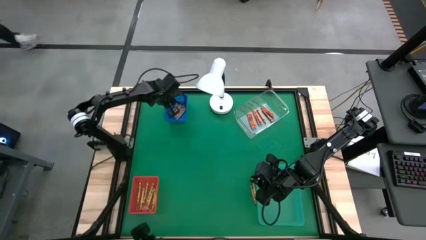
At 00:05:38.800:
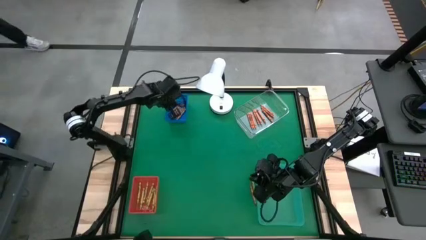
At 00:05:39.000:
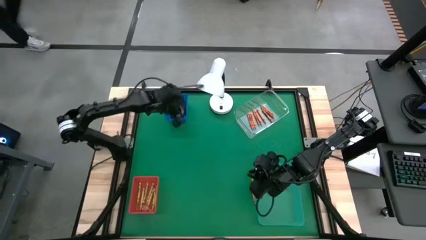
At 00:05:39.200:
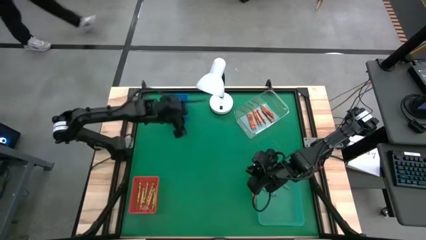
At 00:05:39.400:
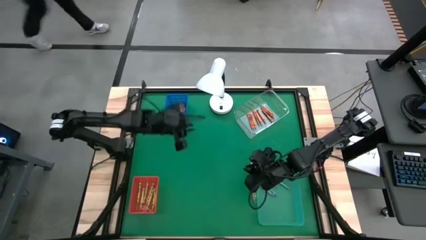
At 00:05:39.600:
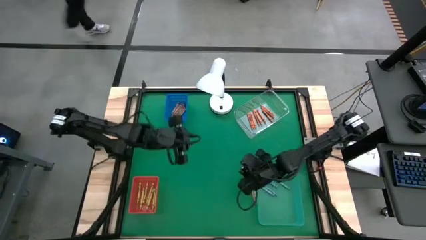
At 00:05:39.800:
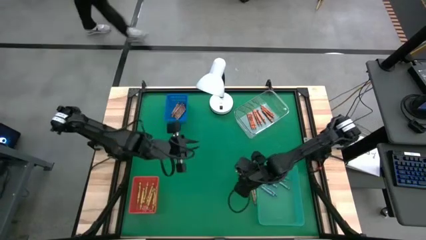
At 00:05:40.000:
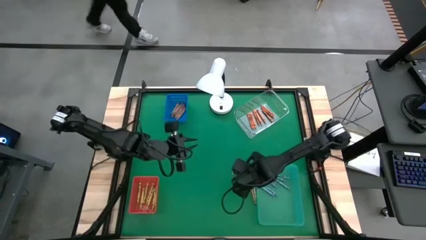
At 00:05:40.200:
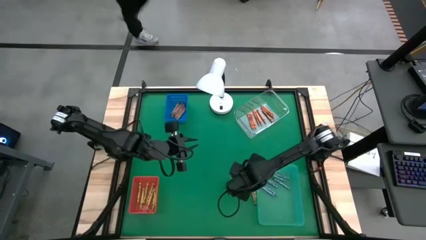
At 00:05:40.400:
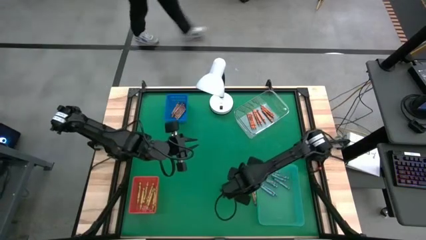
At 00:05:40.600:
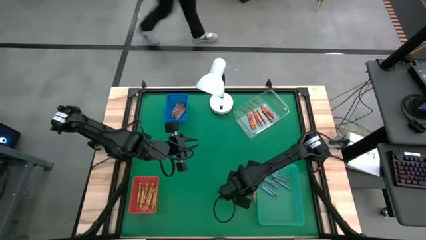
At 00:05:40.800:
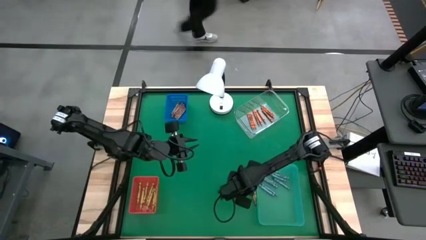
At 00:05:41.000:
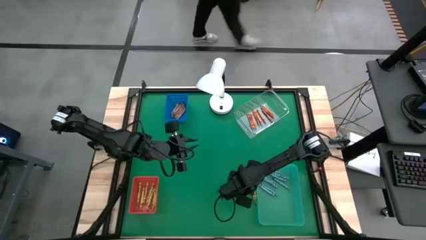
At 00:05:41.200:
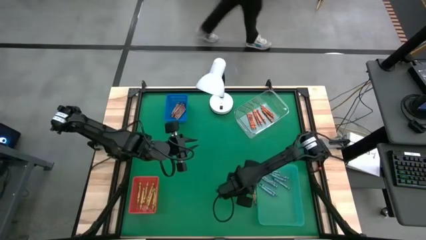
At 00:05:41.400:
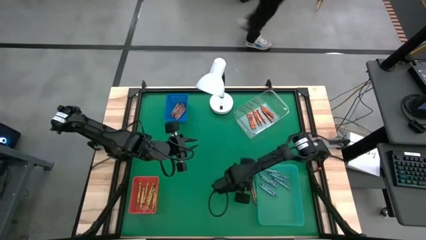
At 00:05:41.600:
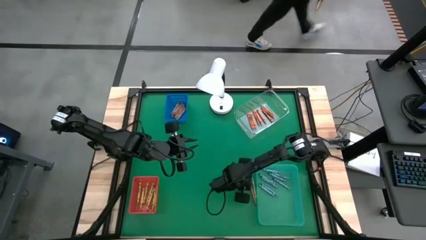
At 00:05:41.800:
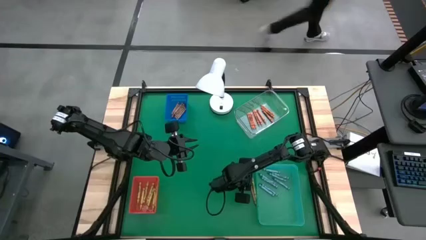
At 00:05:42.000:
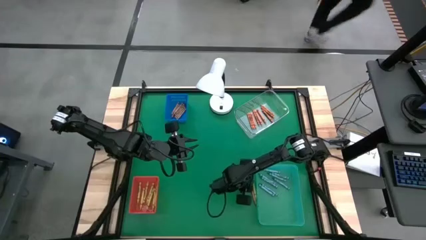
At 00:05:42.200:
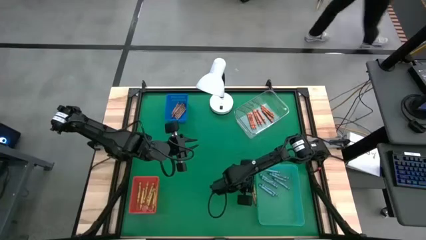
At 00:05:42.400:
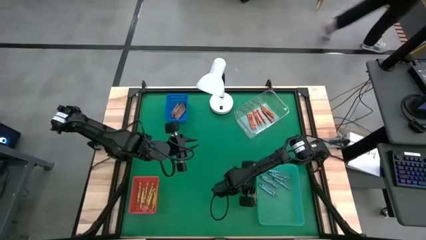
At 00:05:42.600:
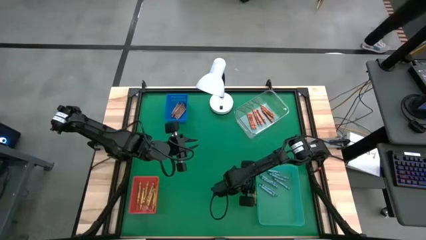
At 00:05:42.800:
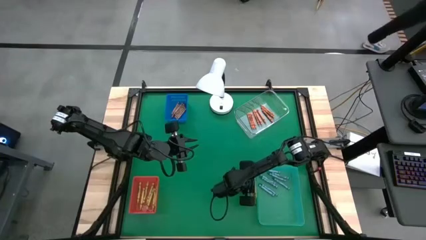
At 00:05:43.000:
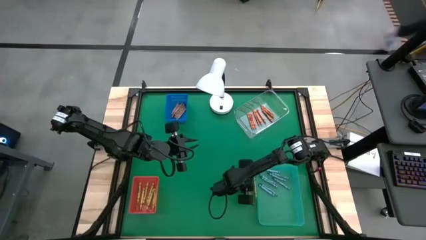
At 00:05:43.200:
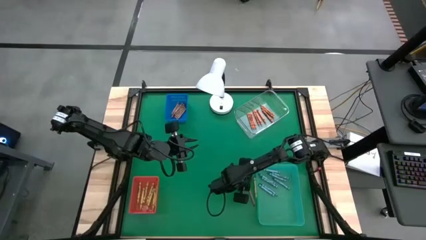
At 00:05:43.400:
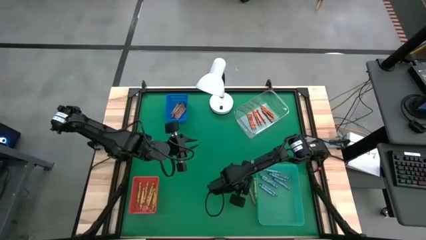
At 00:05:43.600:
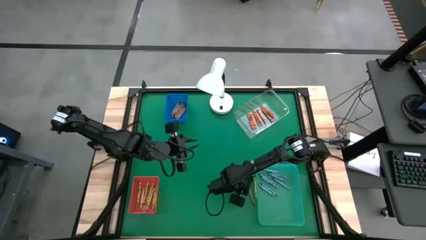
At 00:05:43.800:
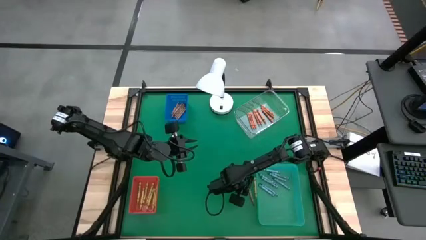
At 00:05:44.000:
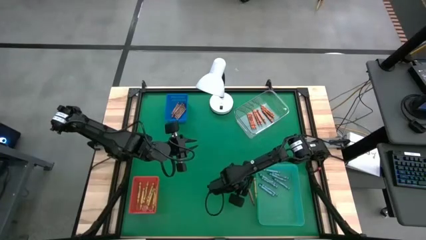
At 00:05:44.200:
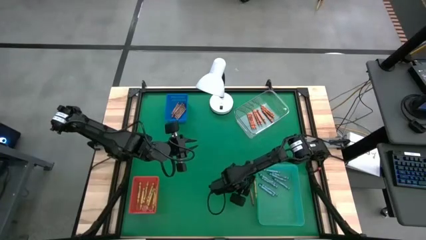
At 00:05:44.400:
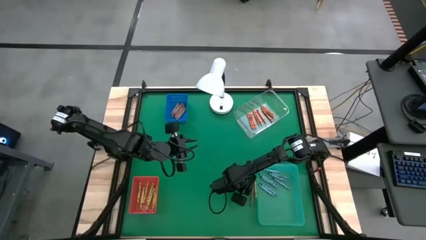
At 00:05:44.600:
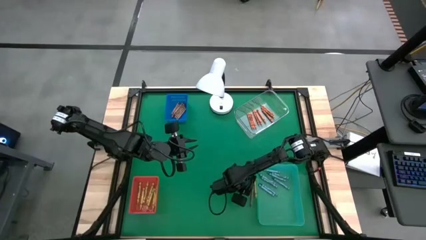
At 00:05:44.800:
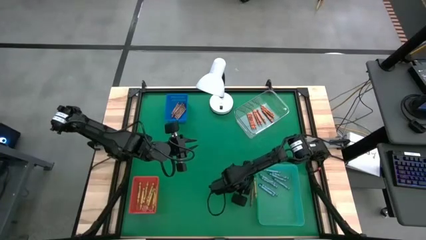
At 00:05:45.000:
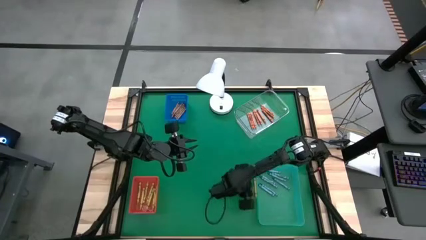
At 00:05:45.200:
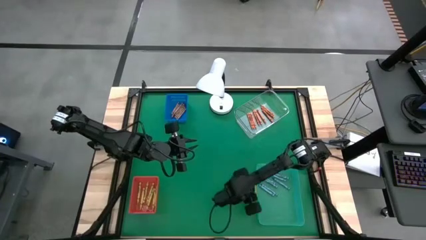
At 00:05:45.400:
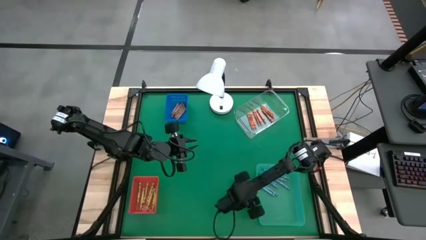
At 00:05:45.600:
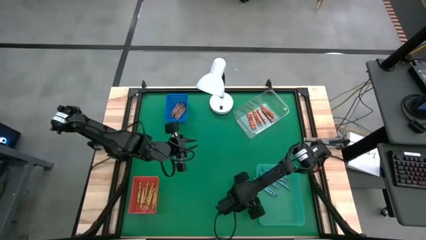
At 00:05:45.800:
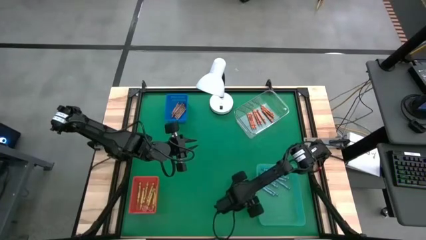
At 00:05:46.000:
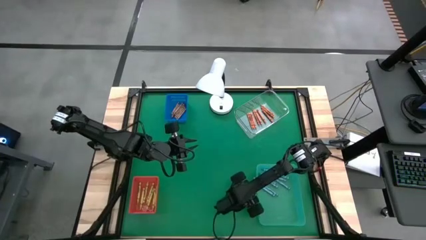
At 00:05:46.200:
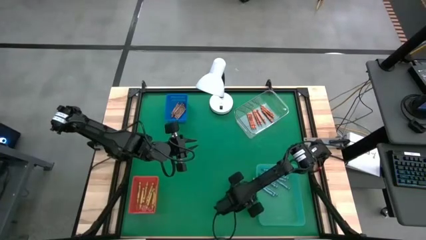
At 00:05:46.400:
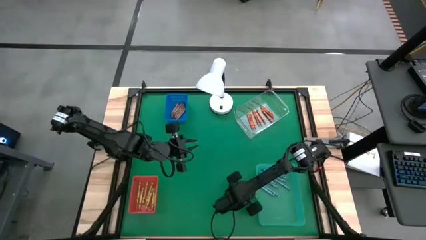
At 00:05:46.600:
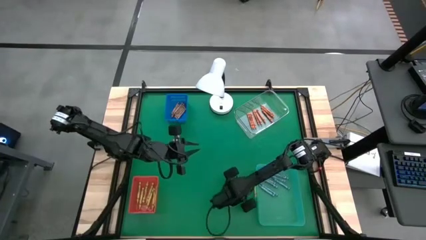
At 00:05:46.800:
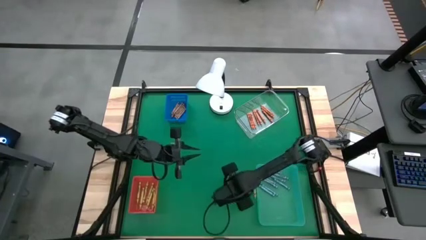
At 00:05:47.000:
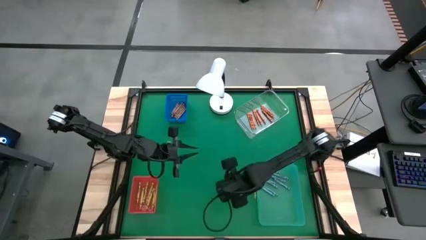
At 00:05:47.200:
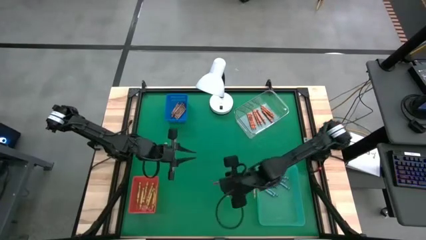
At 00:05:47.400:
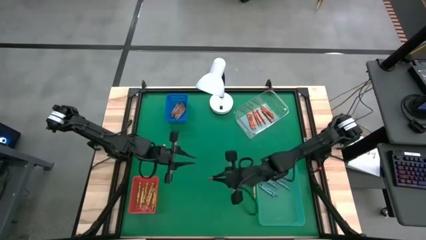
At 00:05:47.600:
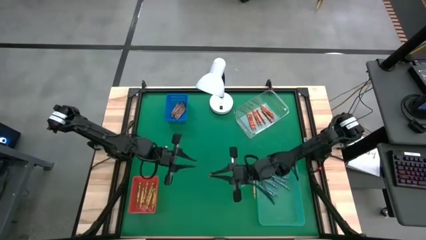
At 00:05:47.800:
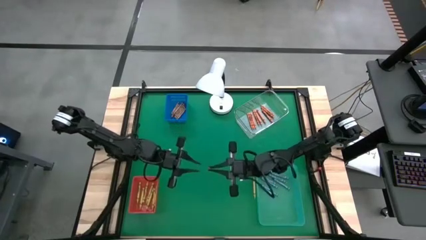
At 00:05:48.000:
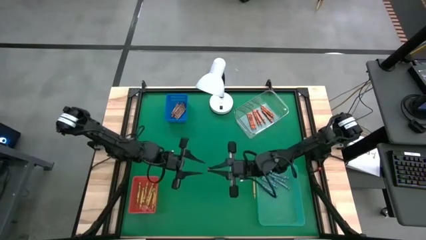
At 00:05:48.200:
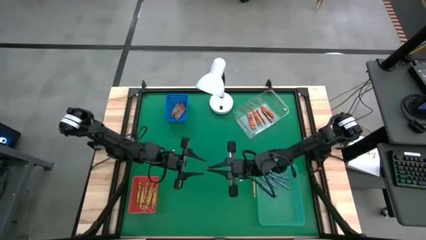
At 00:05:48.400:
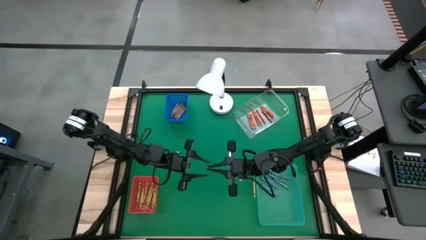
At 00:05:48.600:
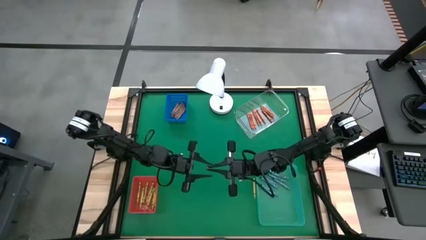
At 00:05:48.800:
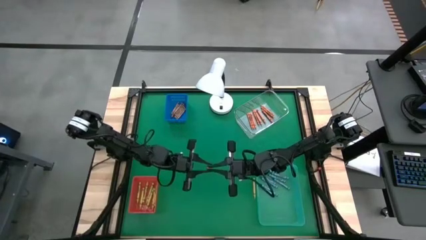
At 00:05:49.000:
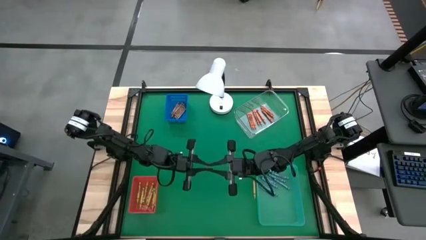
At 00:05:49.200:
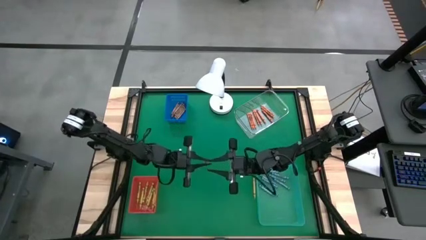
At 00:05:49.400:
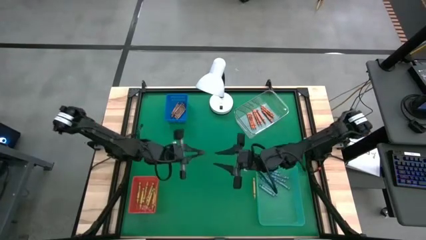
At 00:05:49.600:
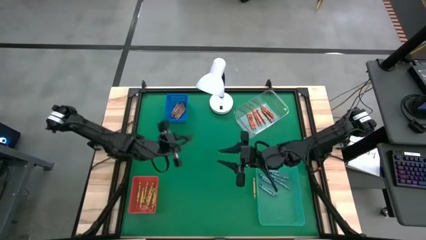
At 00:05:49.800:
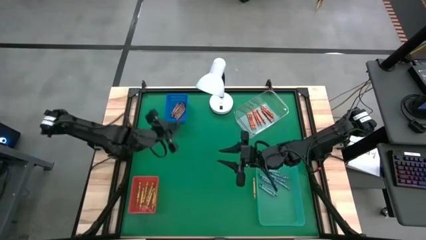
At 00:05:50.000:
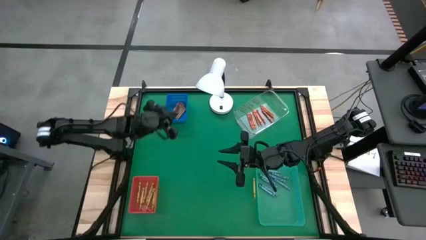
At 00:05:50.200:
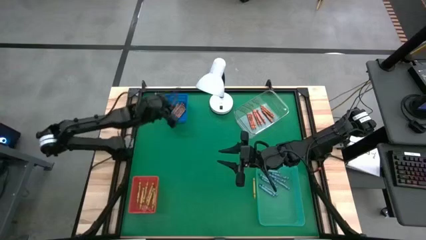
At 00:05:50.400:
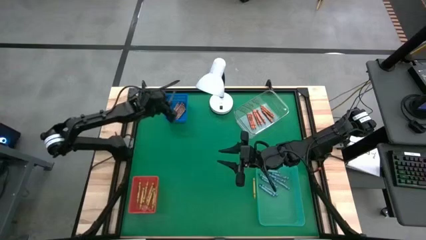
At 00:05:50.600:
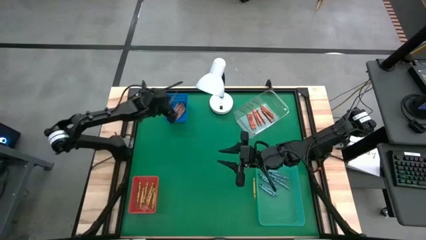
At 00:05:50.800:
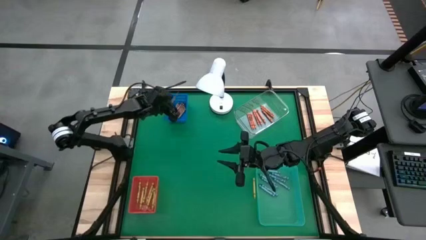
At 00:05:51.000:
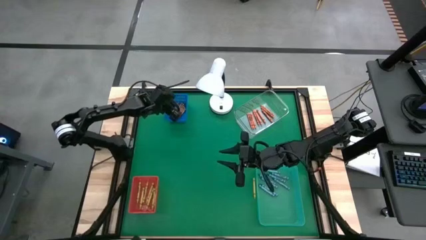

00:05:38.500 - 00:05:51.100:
Task: Sort crayons
Put the brown crayon into the blue bin
